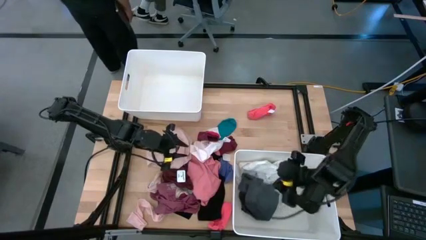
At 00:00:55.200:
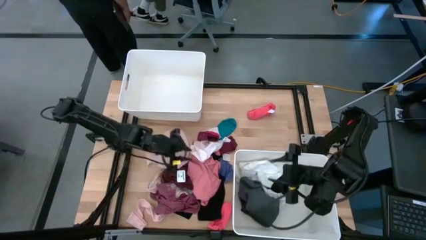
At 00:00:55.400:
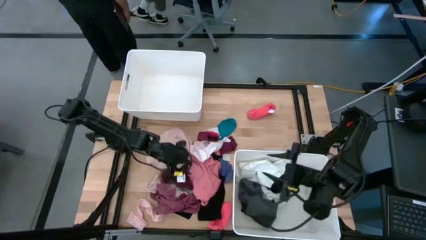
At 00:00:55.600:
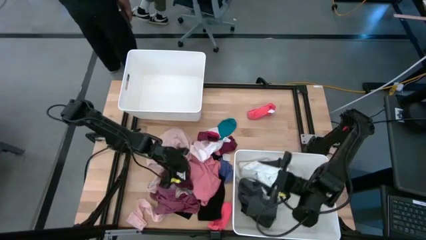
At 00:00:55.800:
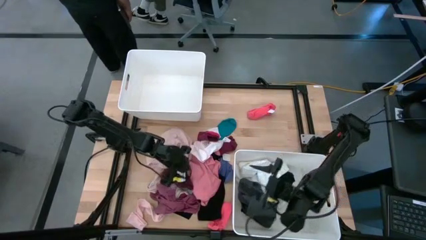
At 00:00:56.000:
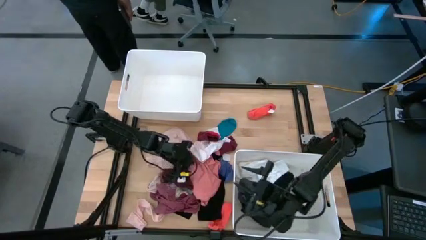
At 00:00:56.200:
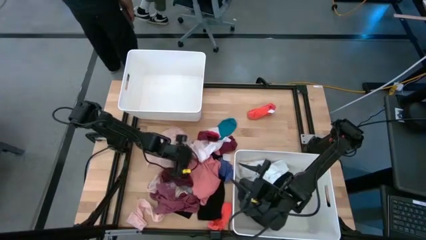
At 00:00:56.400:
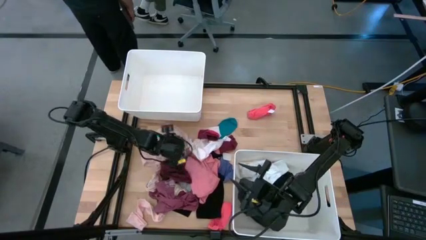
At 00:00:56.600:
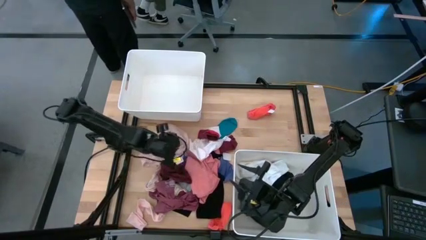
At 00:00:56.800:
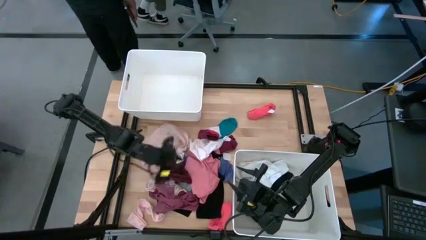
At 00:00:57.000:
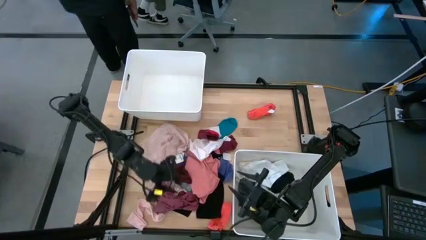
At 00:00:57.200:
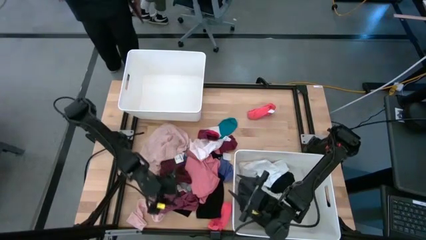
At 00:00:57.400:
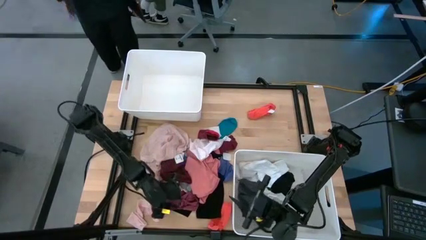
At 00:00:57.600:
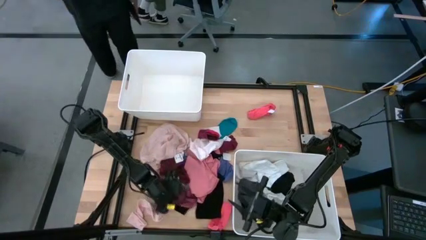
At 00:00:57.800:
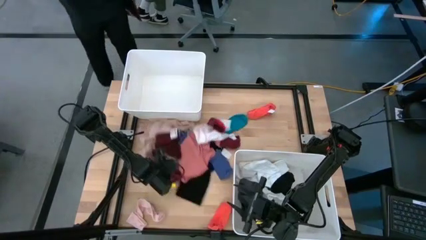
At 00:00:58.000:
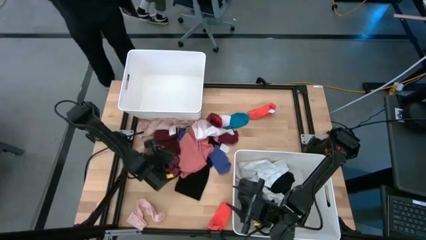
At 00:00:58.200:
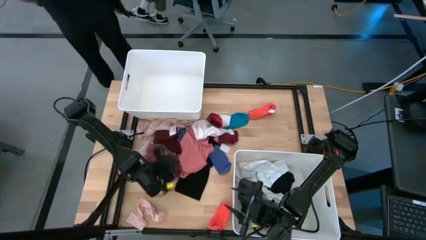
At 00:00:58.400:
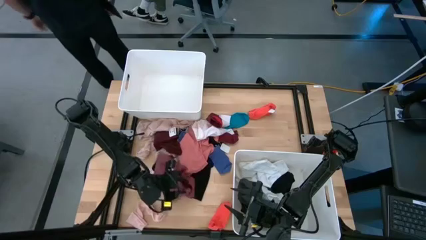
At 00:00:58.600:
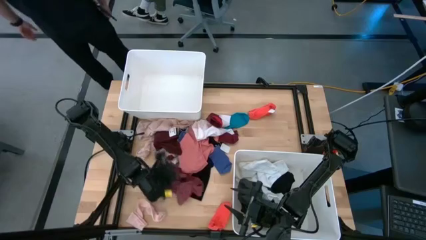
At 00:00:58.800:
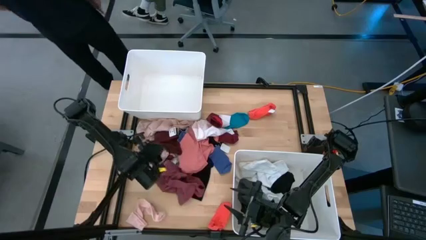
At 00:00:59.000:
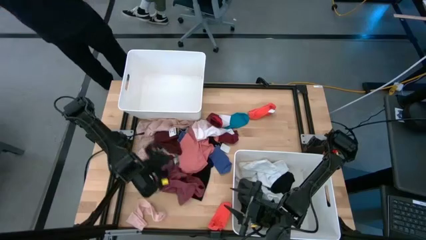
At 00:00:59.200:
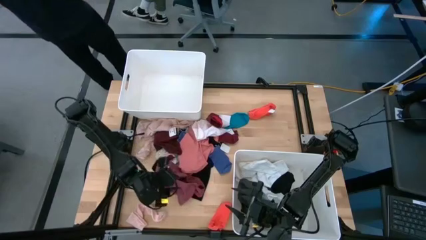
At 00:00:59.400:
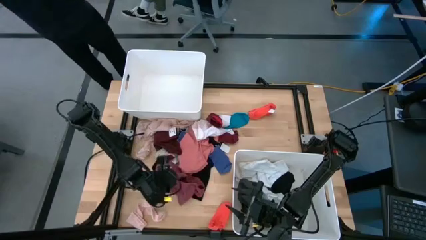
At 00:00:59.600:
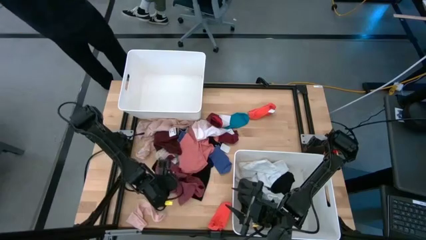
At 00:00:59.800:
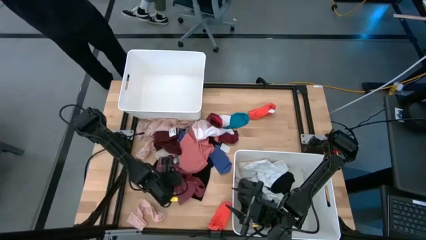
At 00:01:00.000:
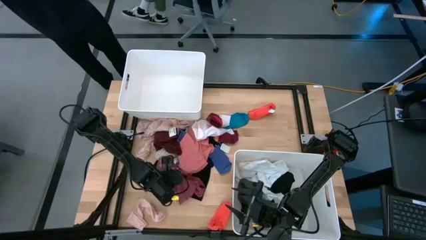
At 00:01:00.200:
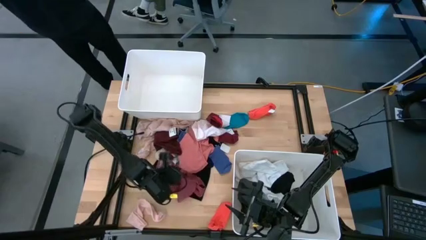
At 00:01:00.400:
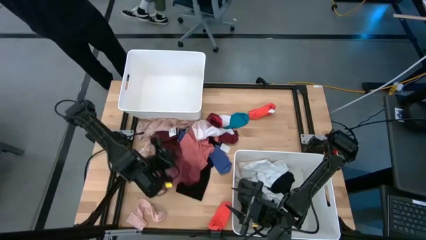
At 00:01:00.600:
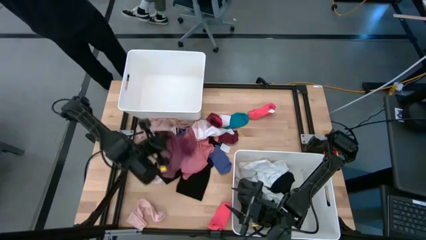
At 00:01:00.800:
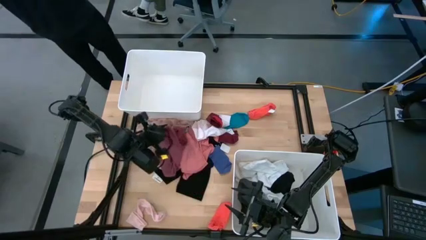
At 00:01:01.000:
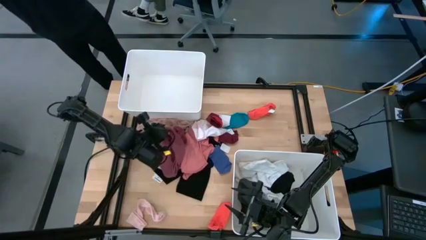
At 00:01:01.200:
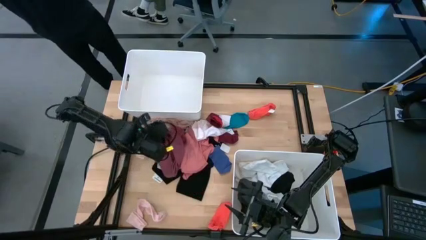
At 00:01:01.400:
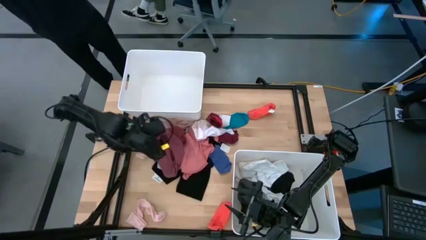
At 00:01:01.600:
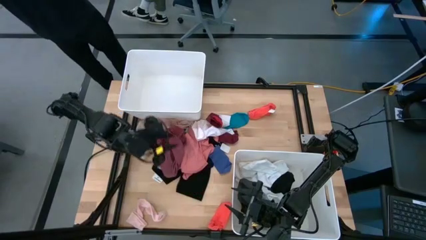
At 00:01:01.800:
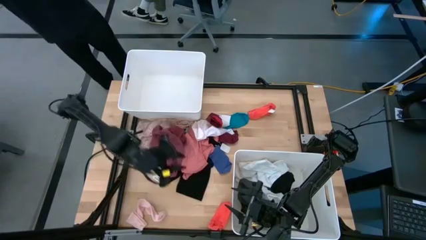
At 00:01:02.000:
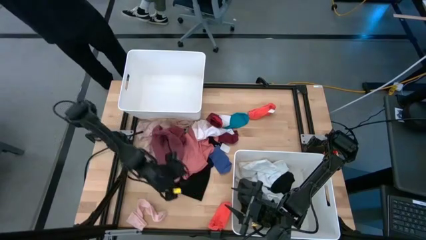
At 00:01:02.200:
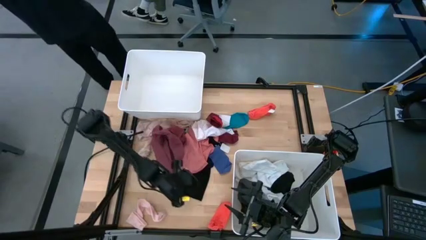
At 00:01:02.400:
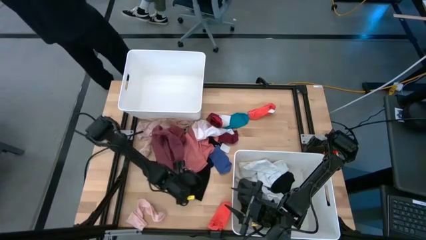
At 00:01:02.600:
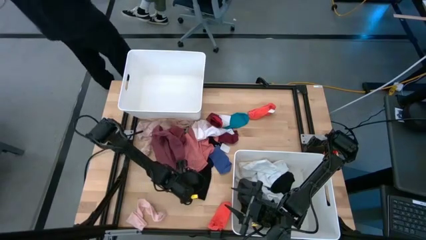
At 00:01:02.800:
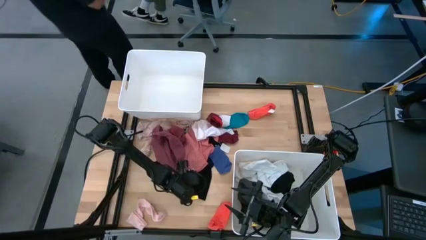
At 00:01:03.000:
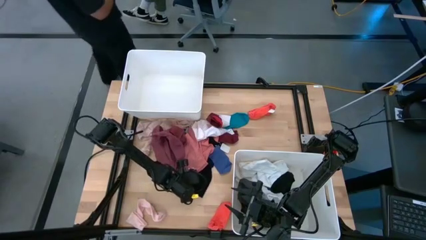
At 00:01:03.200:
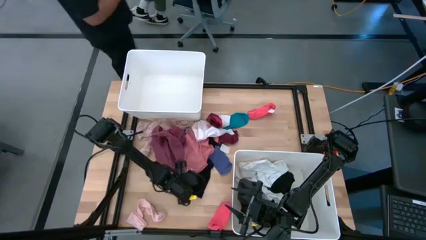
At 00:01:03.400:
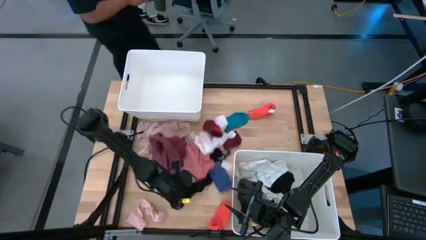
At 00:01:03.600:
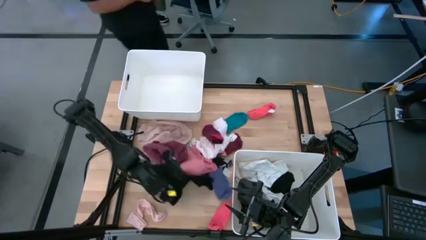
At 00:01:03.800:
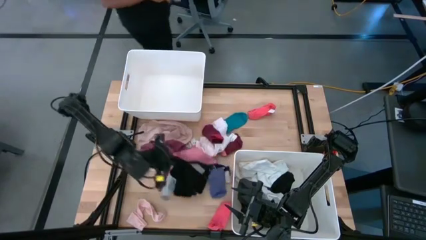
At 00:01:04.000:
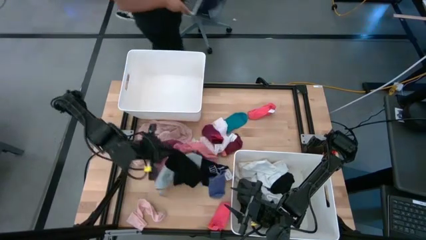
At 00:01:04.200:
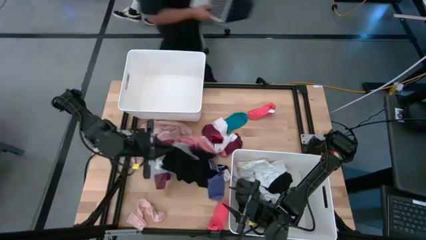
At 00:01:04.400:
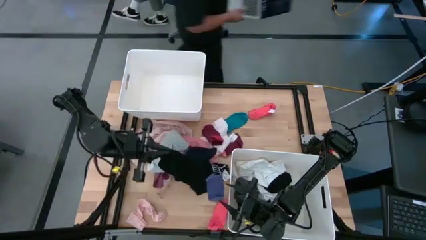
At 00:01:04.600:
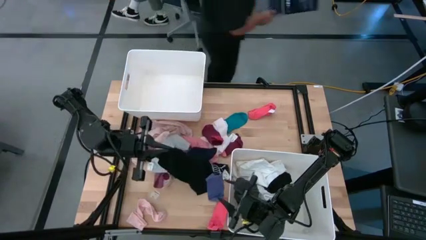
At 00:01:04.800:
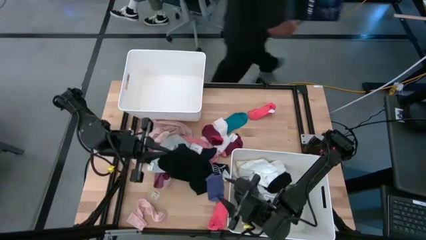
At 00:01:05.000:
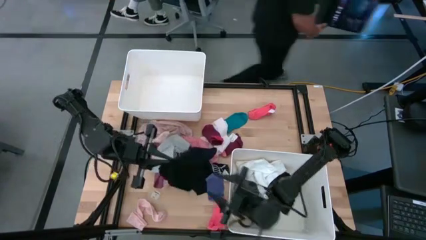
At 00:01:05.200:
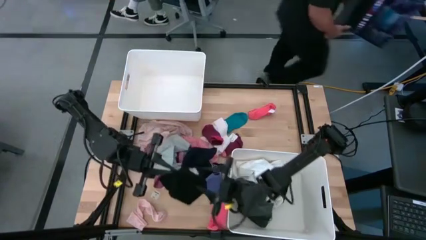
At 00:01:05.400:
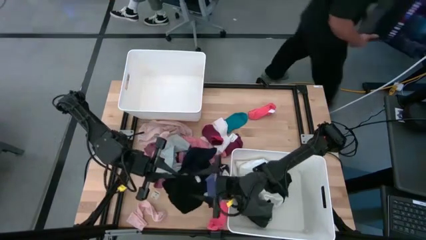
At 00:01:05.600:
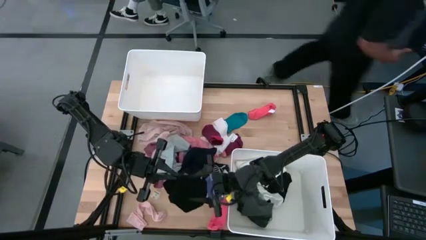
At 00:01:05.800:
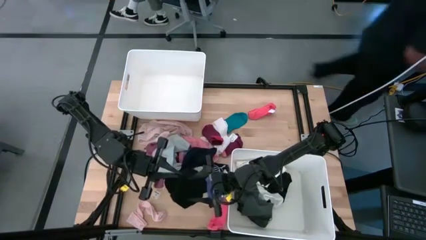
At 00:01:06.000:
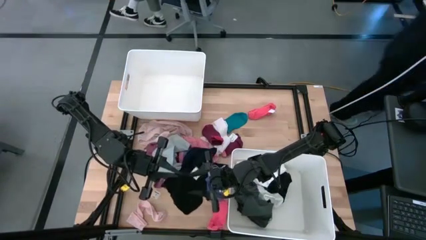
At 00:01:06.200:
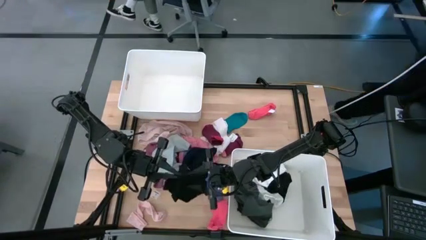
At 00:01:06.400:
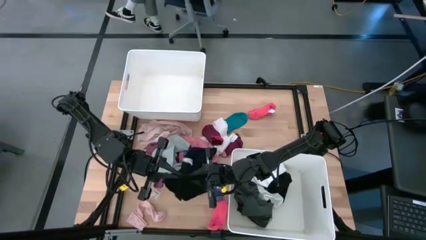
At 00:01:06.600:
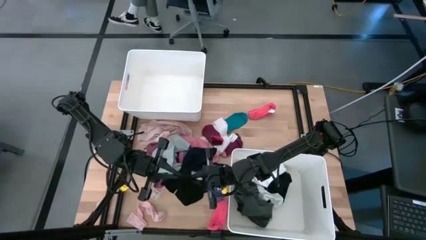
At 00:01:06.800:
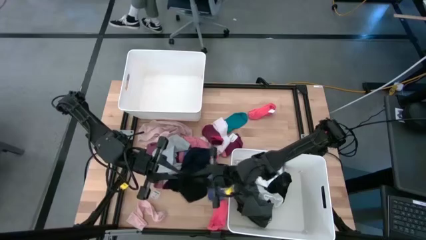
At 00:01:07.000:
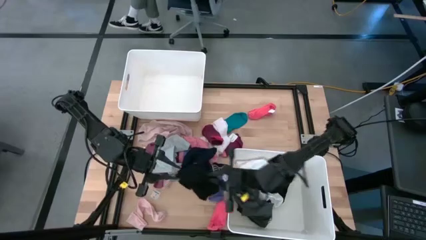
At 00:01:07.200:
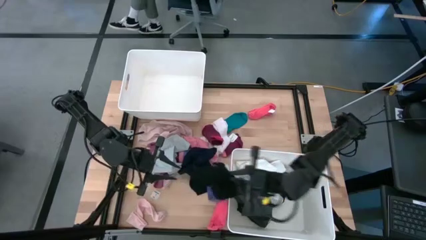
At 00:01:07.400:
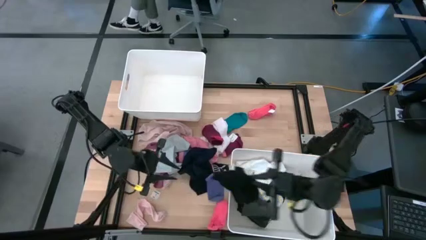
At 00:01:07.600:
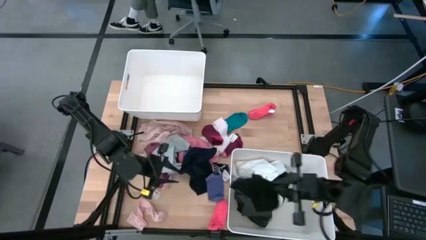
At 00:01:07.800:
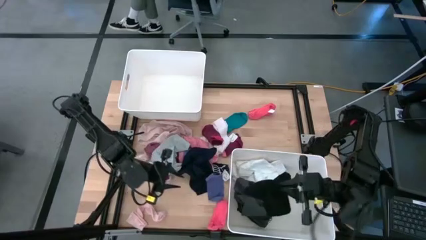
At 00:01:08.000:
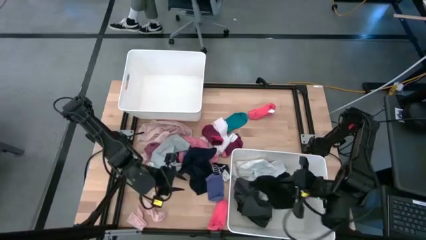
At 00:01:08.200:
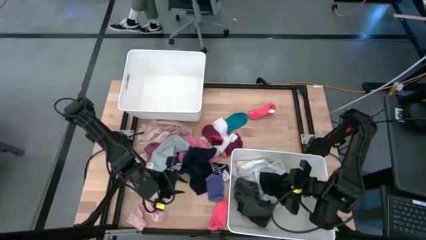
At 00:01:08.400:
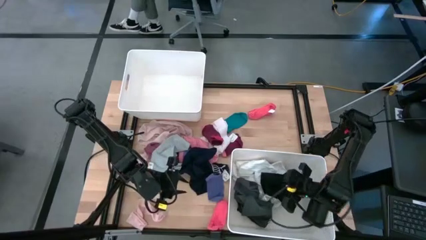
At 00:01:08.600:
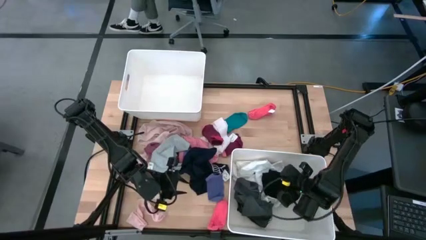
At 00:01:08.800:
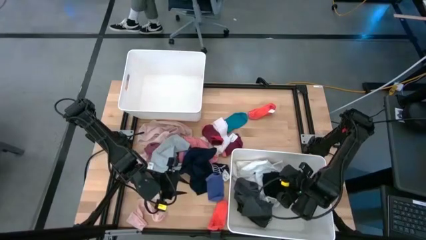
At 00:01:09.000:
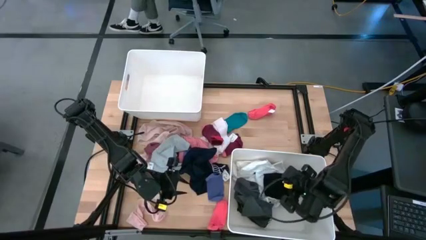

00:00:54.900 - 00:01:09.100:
Task: Sort clothes
Put the black underwear into the bottom white bin
